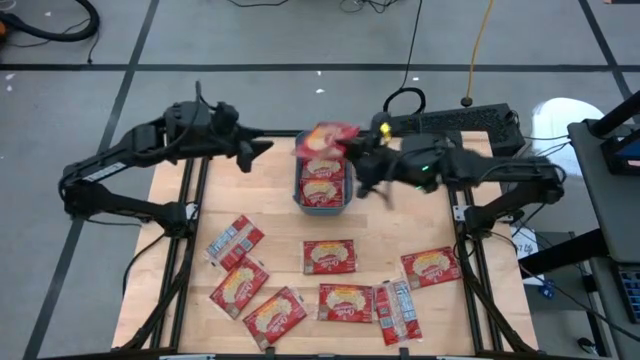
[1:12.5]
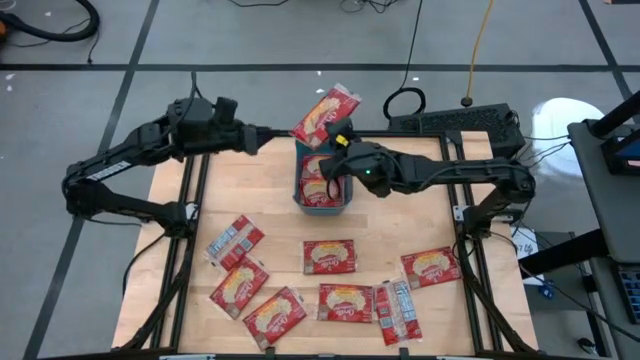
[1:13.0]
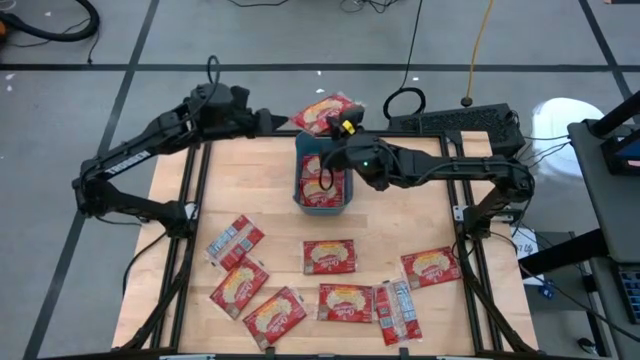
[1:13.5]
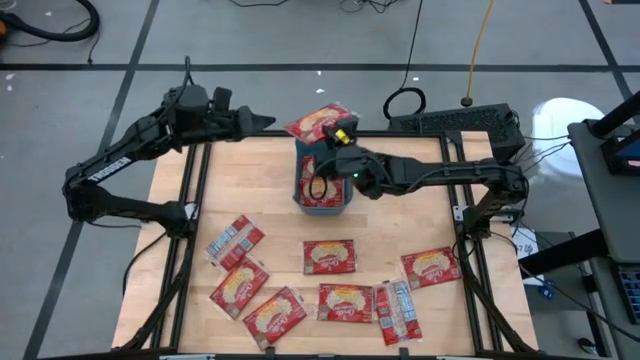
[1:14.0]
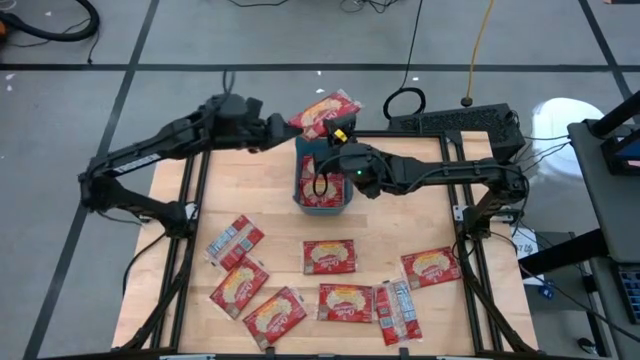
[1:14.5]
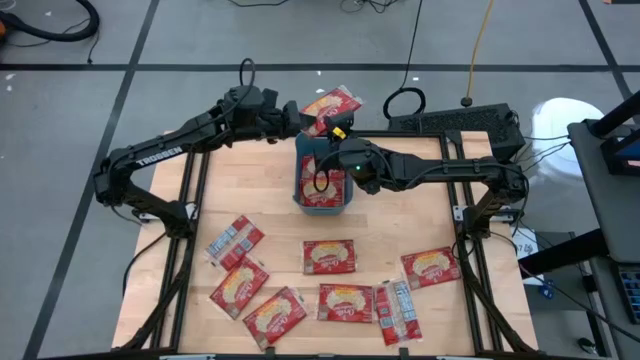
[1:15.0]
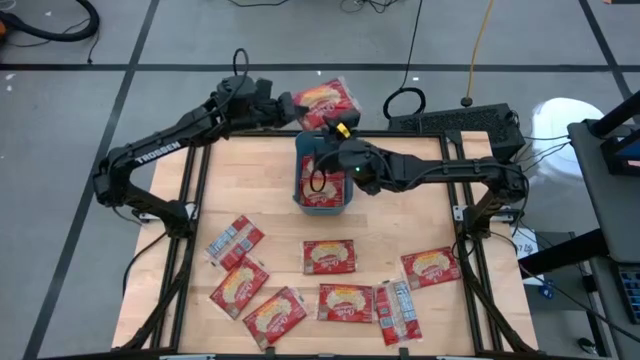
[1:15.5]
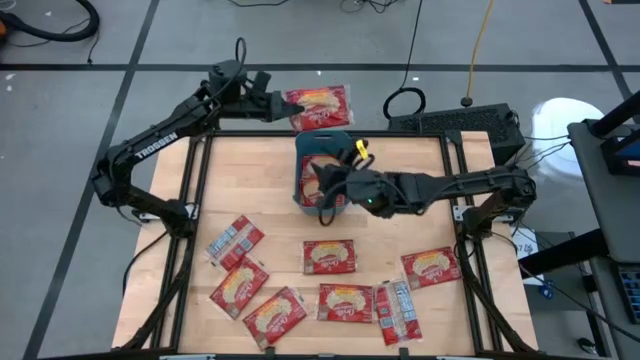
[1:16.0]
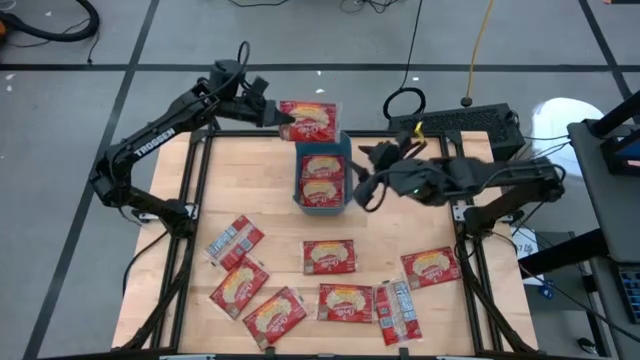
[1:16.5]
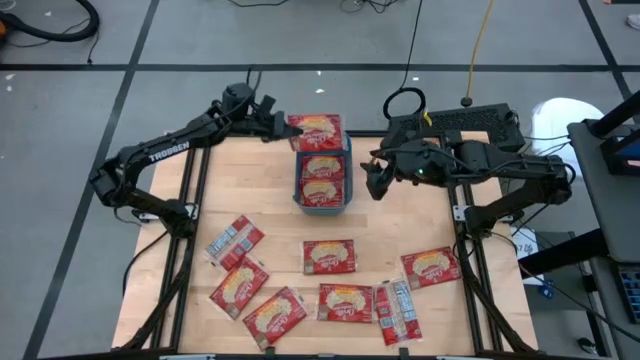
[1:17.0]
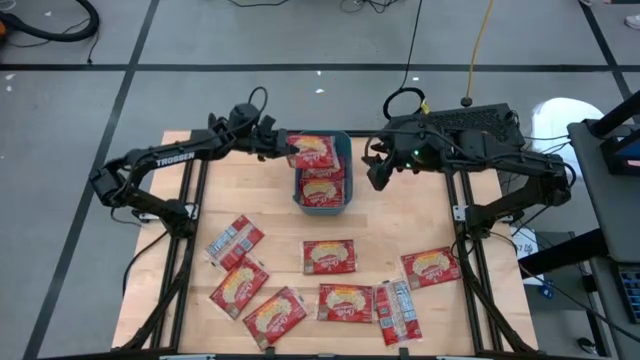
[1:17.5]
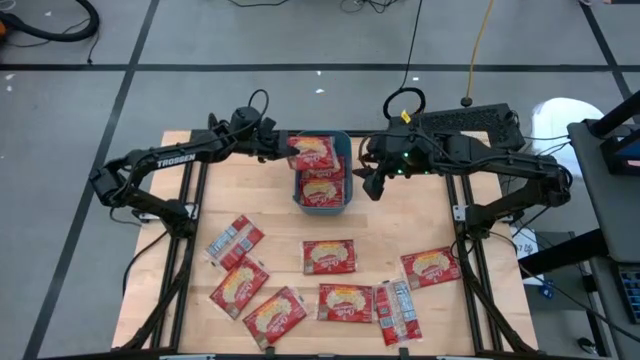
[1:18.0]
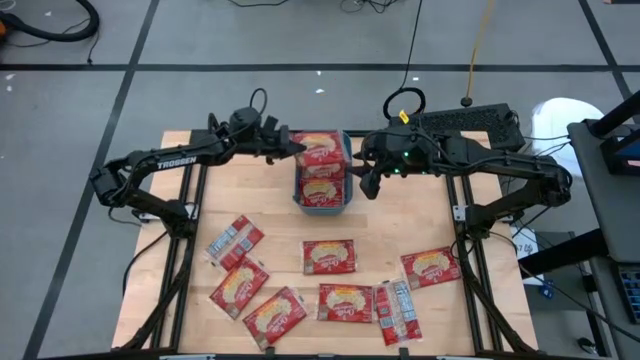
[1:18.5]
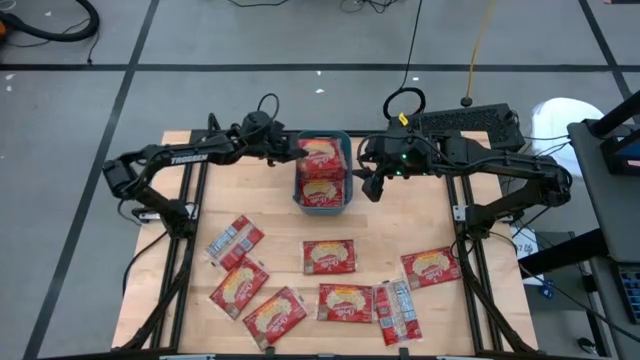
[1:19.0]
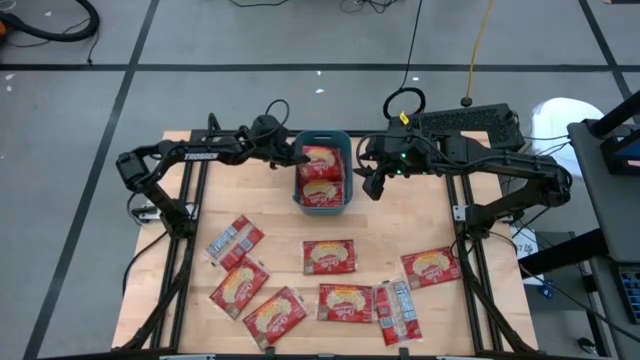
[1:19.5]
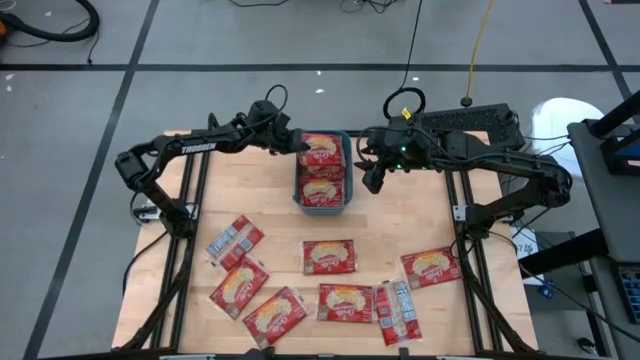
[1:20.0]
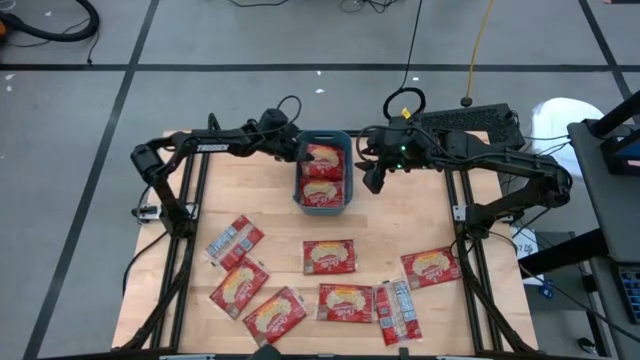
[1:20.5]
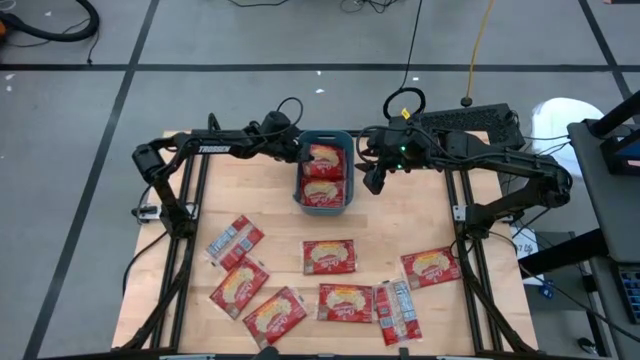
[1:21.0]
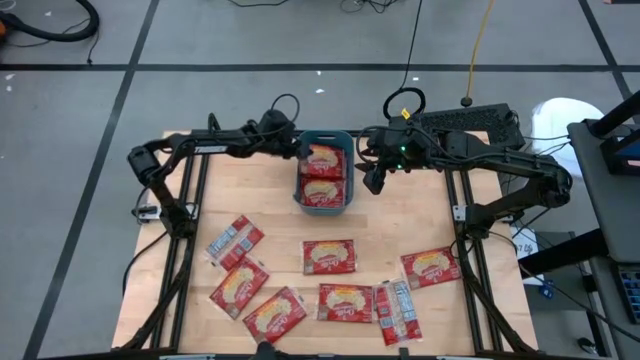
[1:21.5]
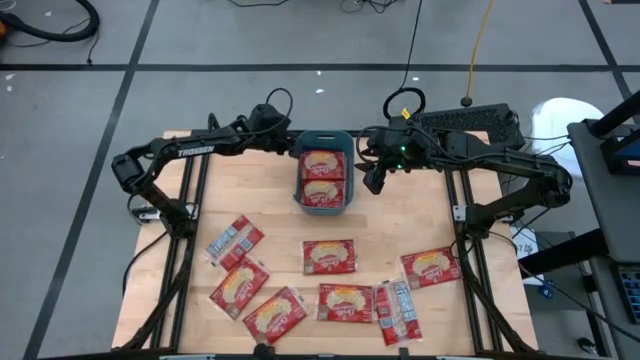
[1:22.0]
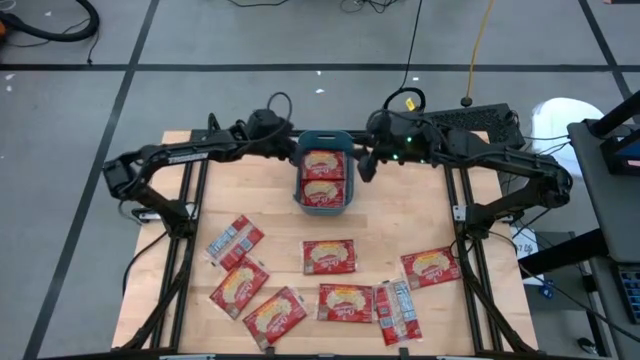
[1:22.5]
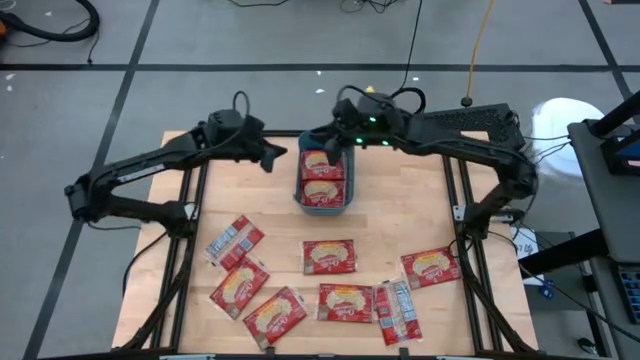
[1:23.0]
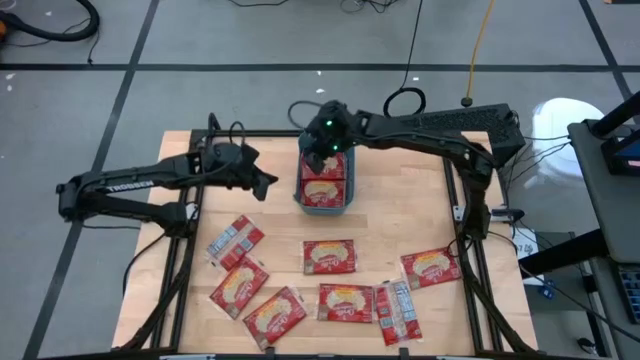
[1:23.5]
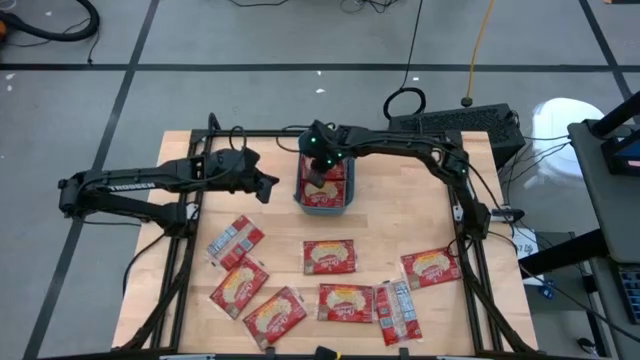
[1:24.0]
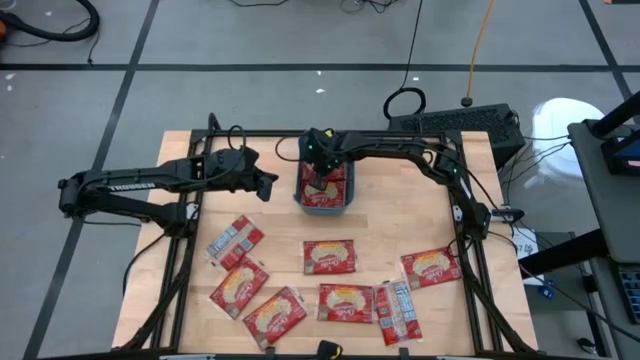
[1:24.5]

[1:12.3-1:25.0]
Task: Sort popcorn bags into baskets
Put the red popcorn bag into the blue bin

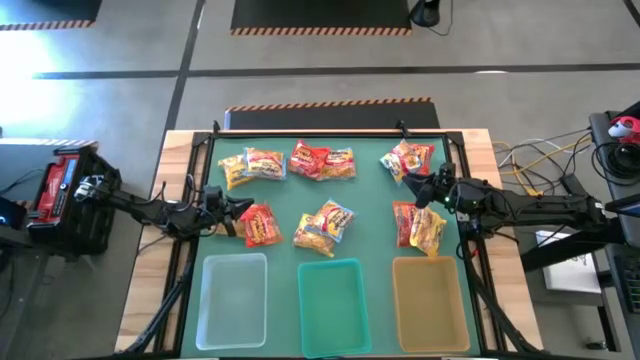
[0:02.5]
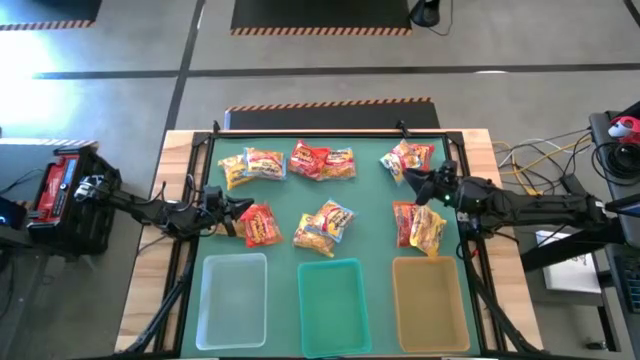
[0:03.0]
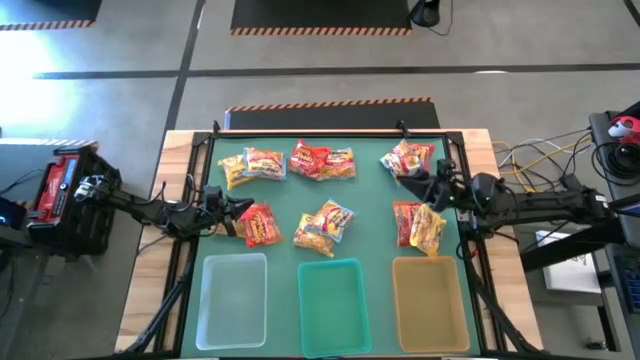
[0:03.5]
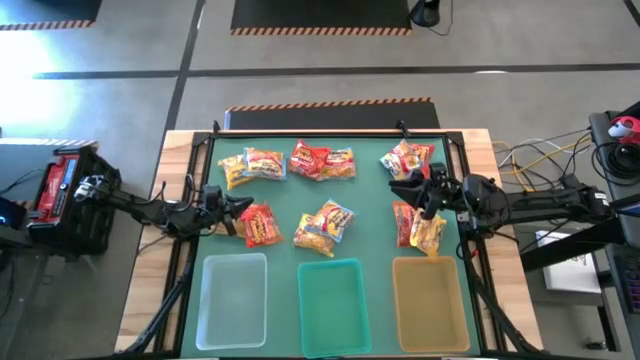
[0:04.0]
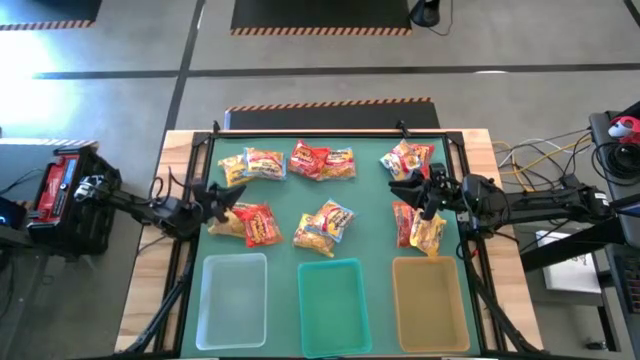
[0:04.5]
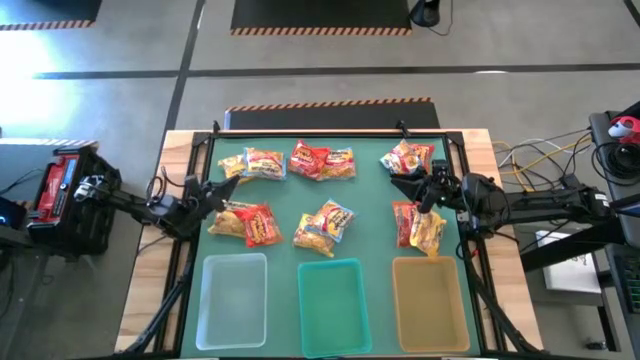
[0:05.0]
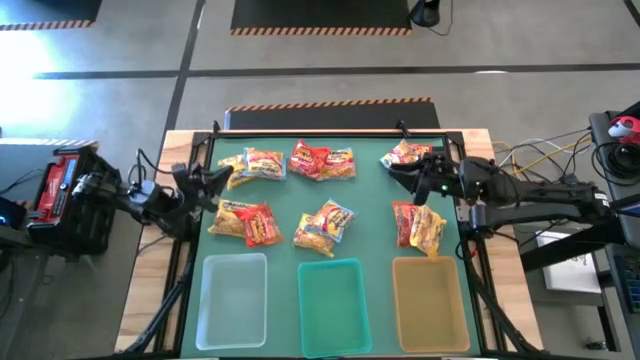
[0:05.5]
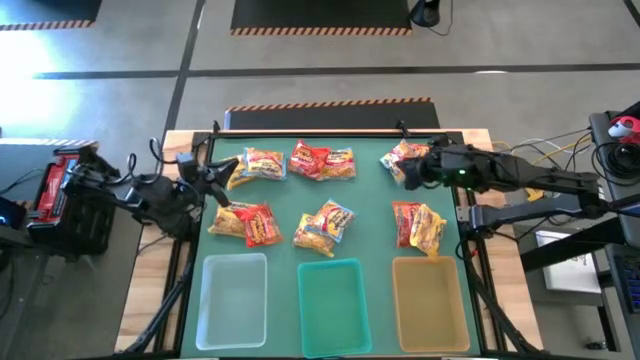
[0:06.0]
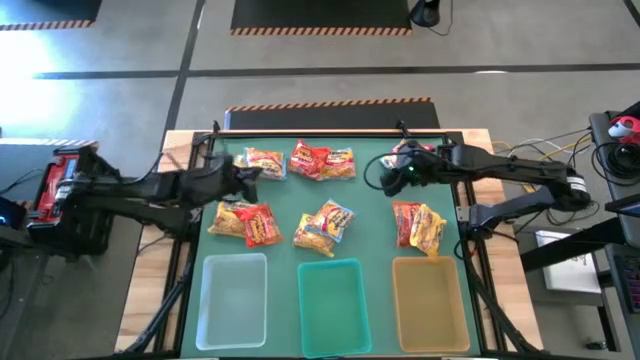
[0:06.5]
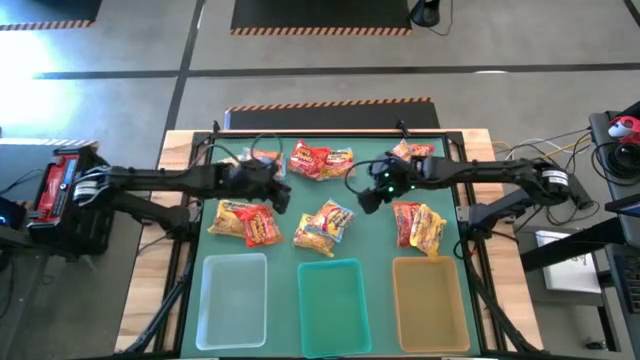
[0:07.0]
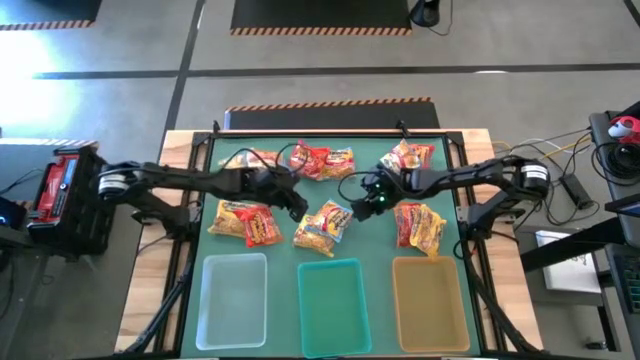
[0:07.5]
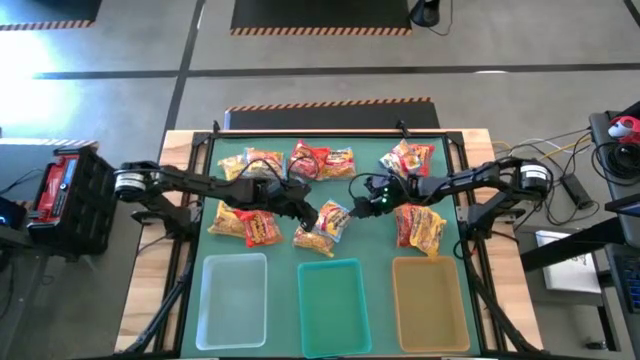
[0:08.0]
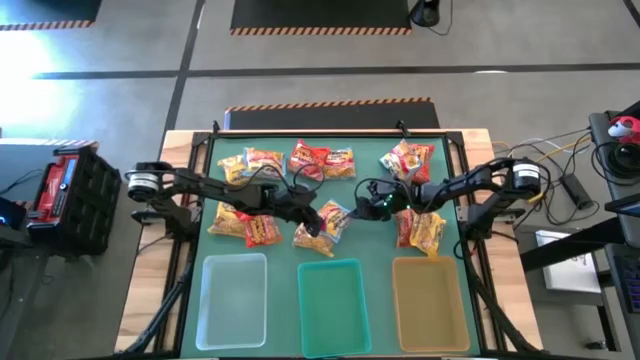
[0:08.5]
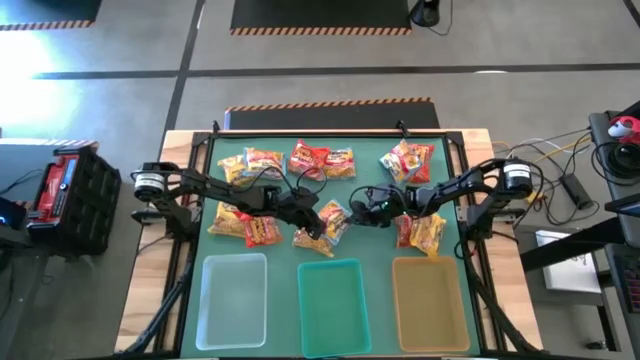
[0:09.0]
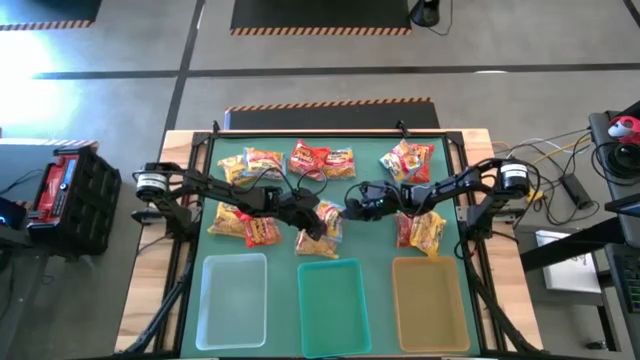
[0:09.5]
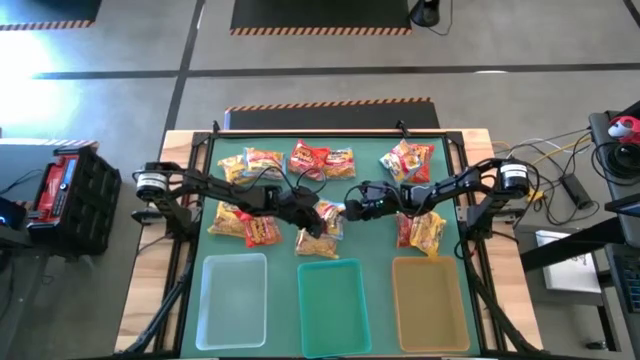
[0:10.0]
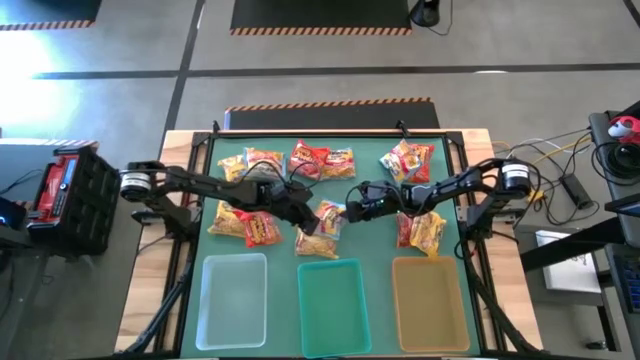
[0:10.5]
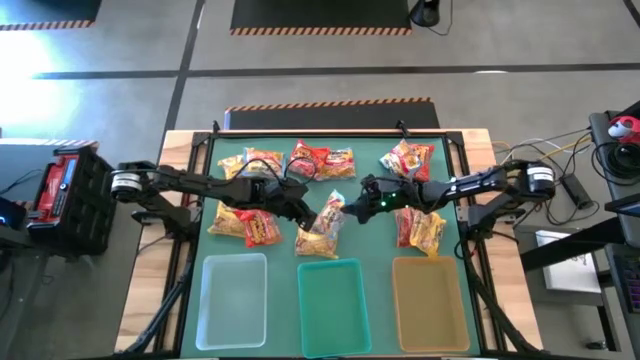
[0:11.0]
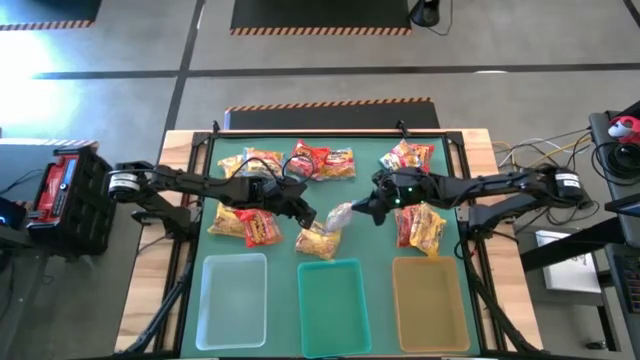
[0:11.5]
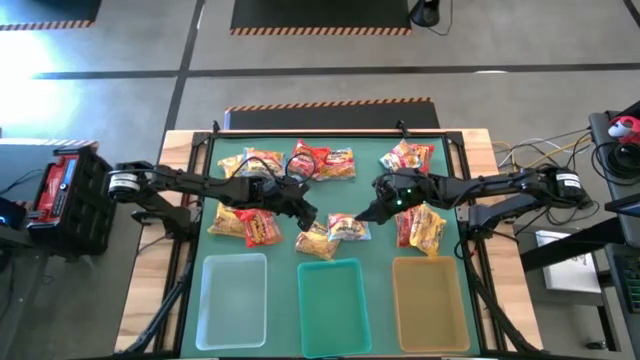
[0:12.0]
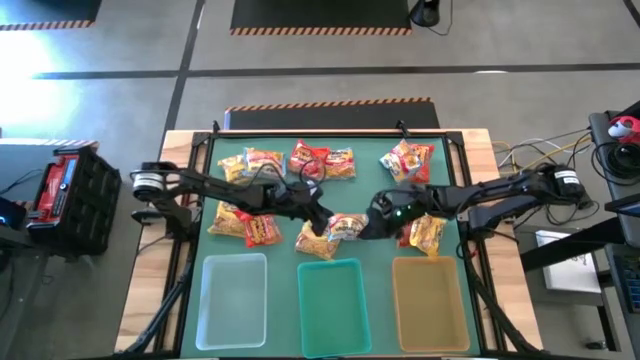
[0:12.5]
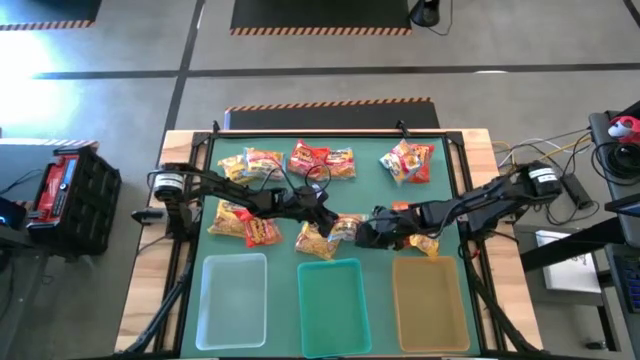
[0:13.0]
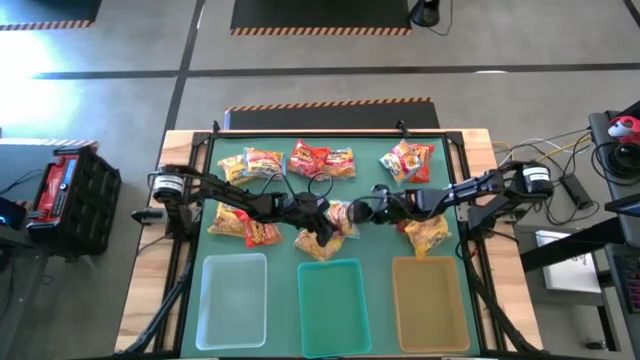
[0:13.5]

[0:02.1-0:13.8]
Task: Sort Maruchan noodles
Put the blue noodle pack into the yellow bin
